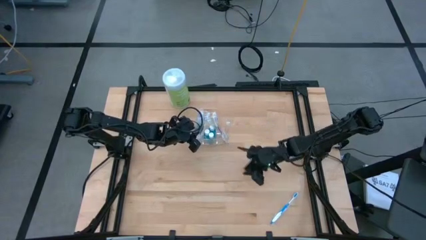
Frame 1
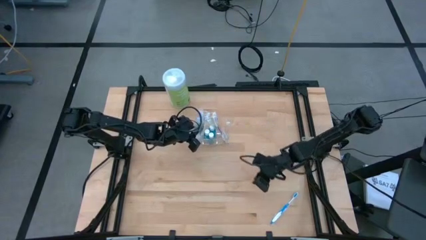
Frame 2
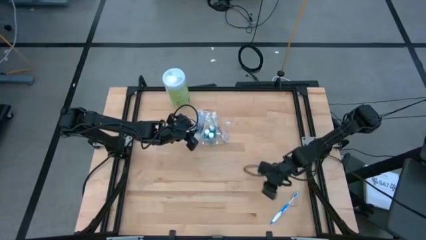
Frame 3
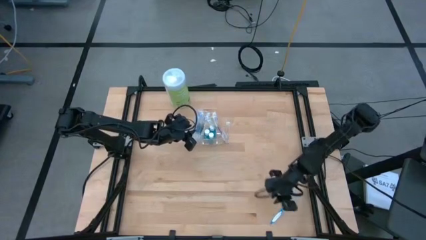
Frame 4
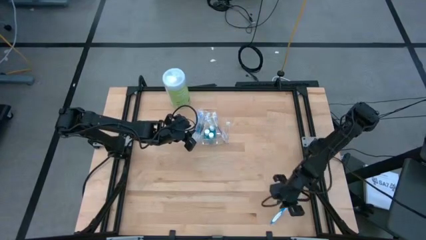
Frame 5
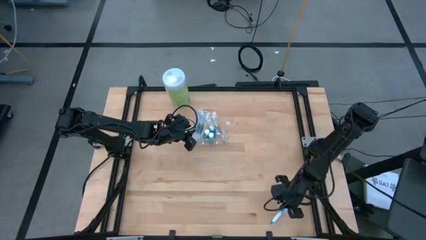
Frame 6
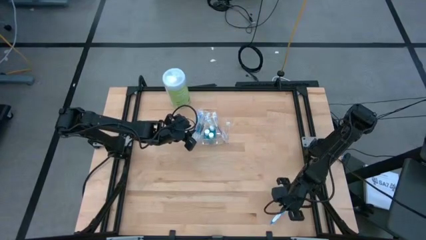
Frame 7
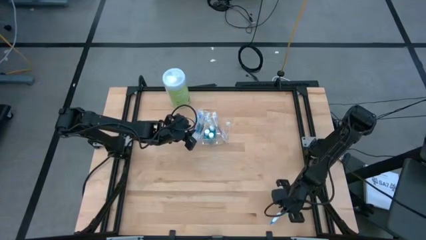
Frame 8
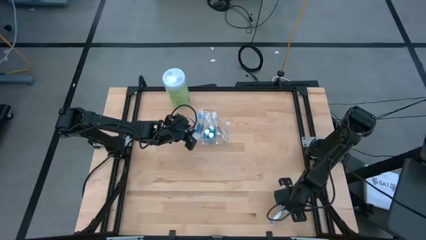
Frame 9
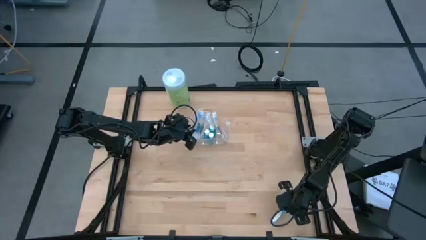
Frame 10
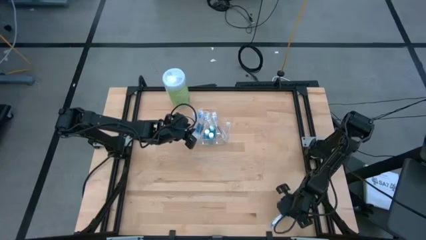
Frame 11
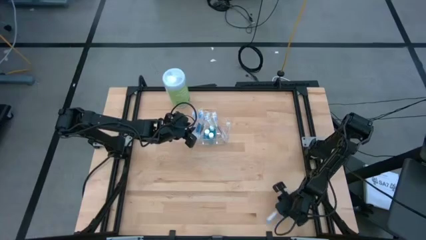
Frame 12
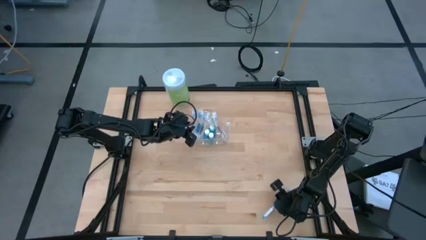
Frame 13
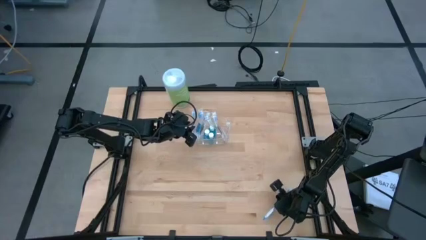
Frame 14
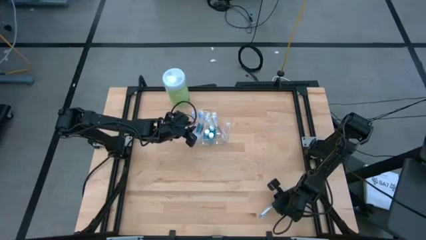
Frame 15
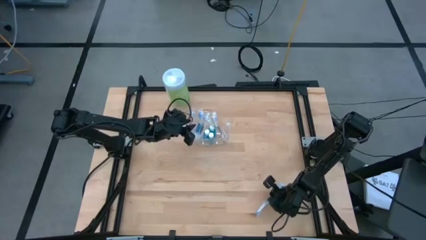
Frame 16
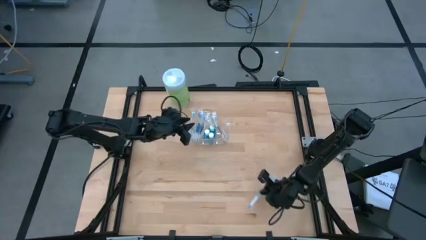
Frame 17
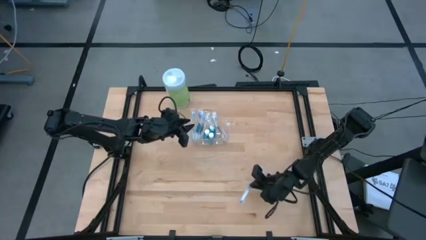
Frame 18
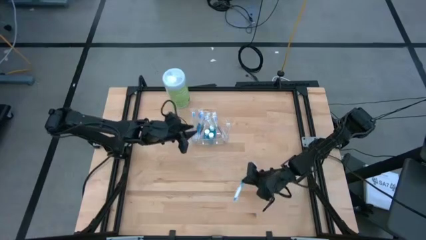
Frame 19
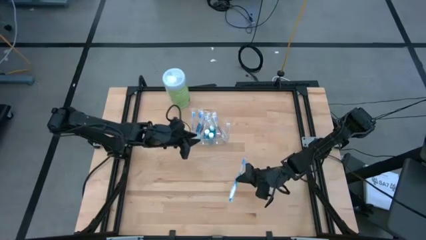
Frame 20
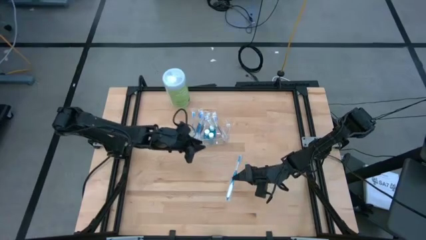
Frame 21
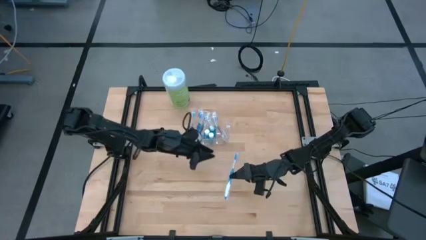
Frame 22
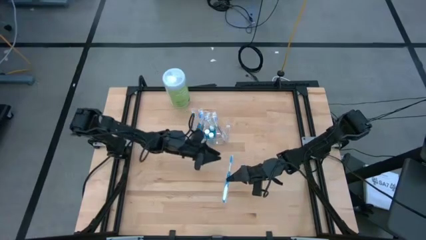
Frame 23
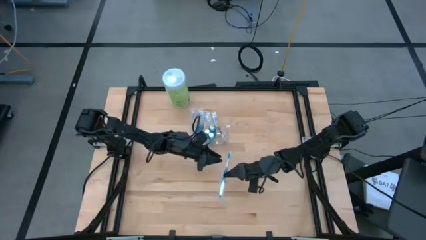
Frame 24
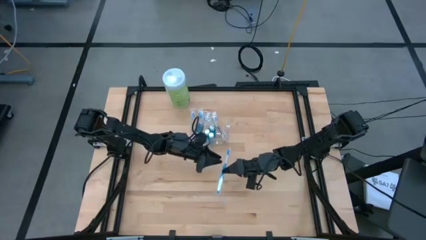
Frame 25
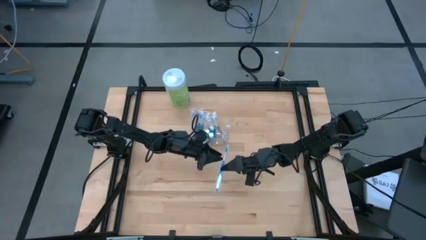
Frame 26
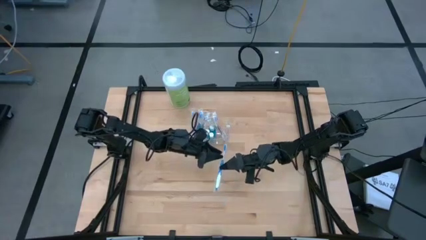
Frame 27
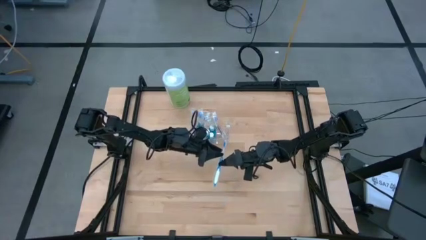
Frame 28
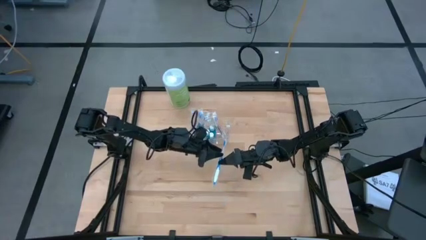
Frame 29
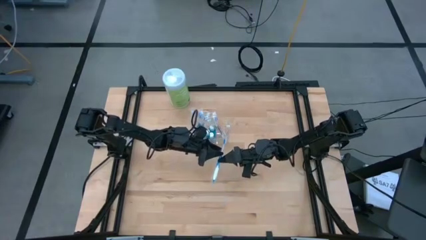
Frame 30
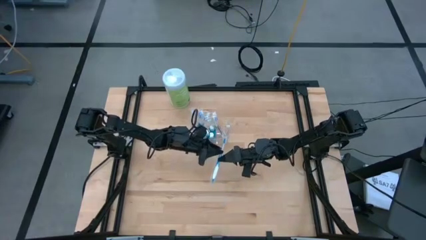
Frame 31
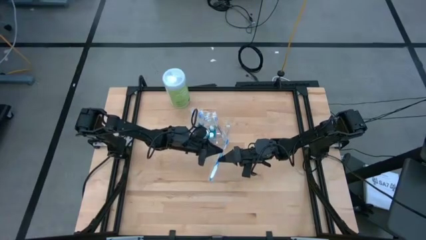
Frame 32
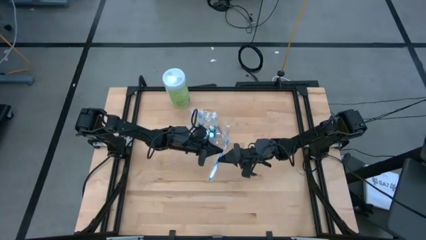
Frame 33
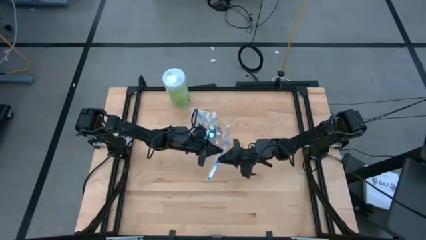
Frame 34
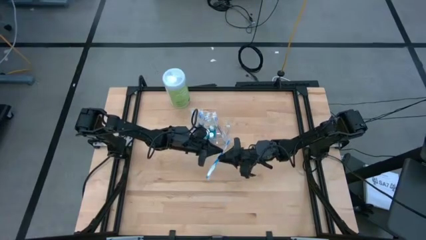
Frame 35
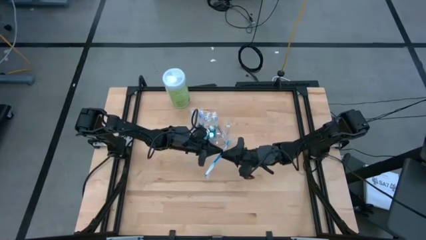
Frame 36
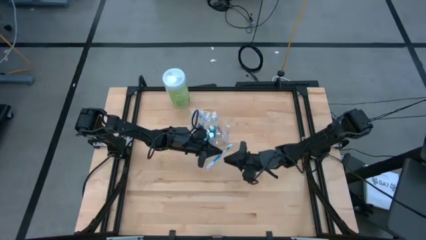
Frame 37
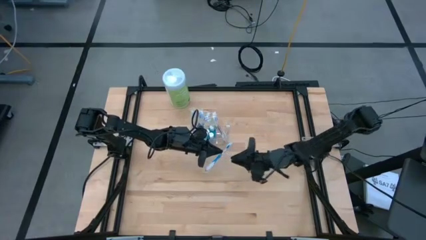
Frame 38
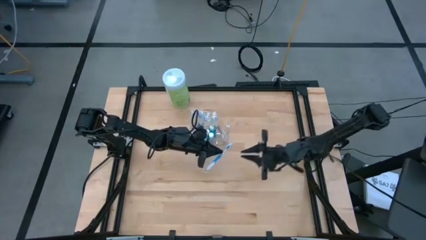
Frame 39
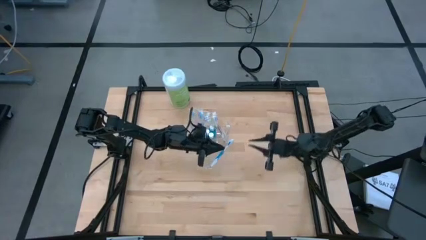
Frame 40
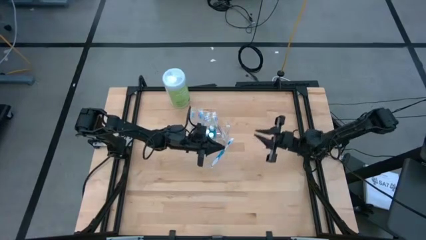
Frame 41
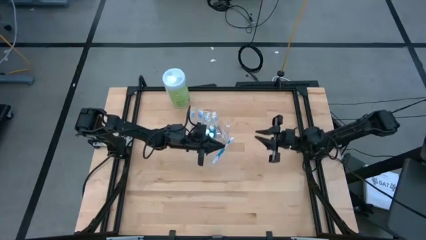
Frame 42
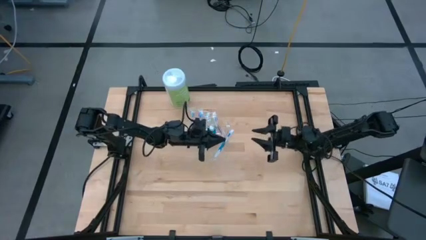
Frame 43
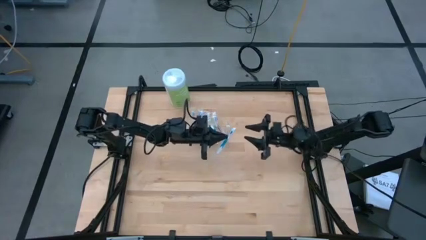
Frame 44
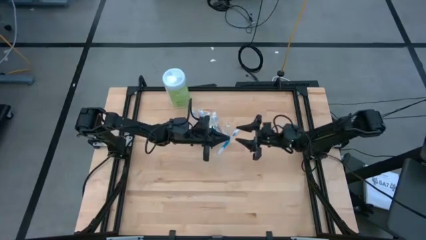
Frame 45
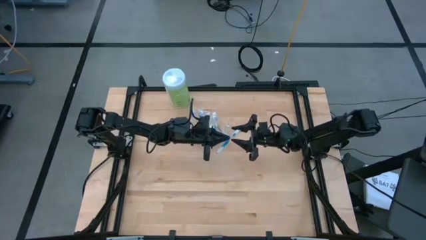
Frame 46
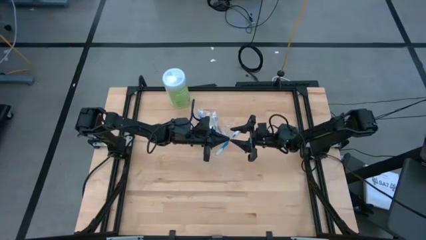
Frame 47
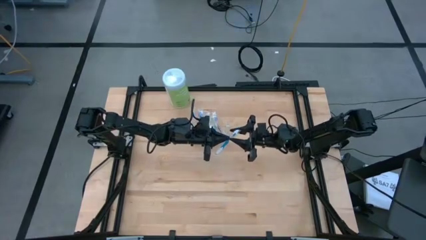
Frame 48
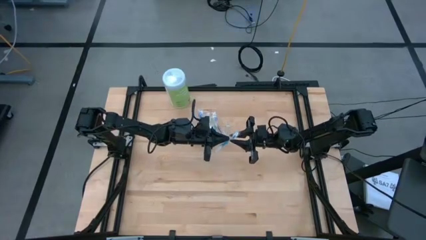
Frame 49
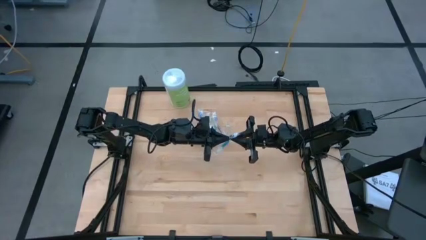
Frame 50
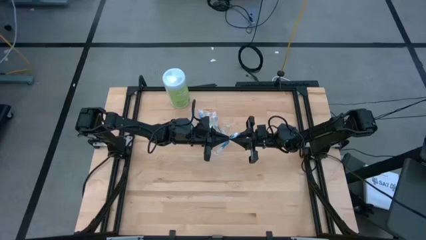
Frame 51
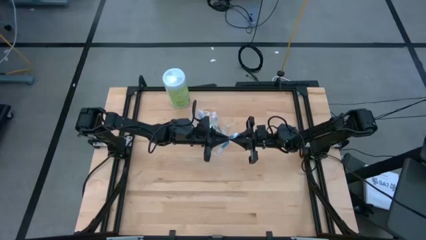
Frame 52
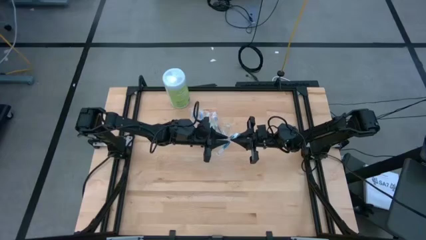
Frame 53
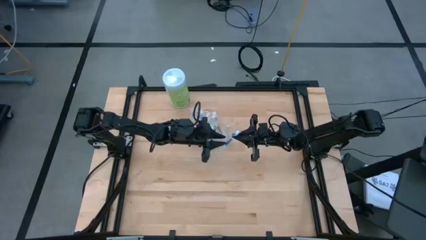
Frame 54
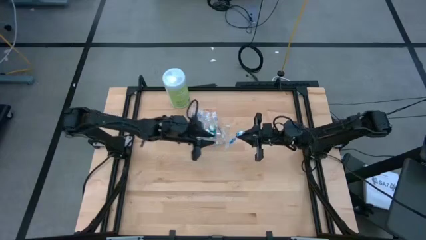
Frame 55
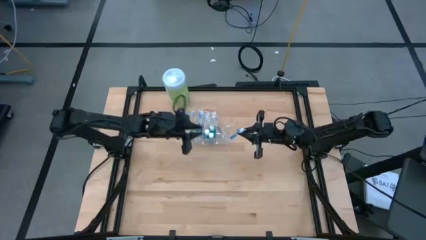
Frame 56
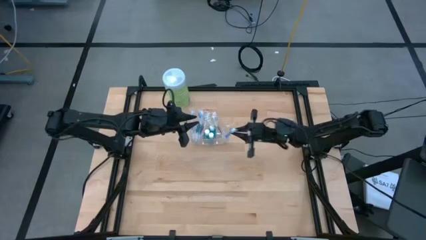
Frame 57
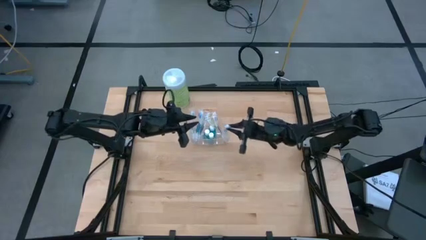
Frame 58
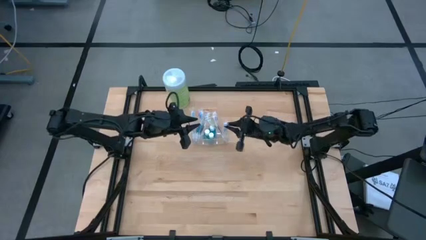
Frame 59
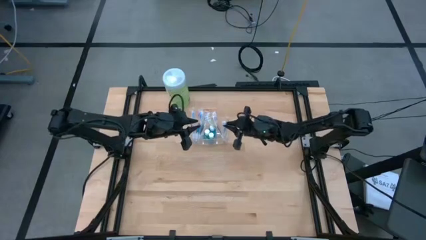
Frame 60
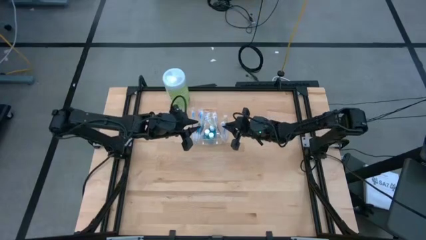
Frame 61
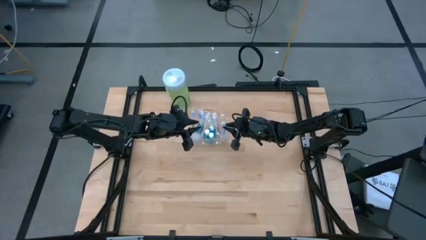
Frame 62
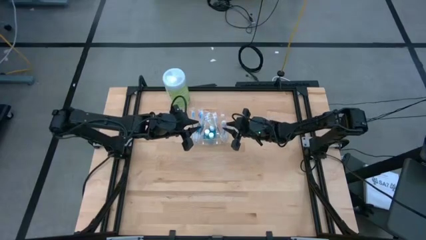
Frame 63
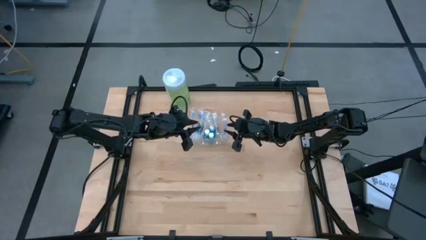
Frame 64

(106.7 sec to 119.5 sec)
Task: Pick & Place toothbrushing station
Put the blue toothbrush into the transparent organizer

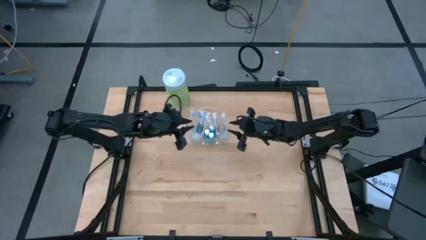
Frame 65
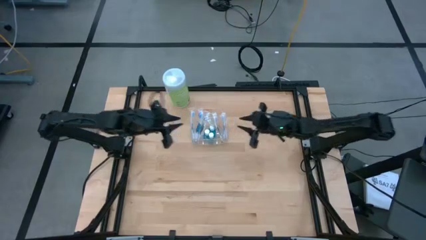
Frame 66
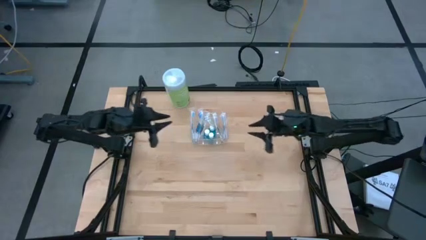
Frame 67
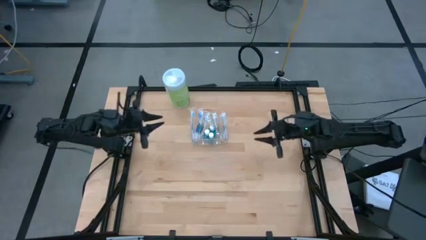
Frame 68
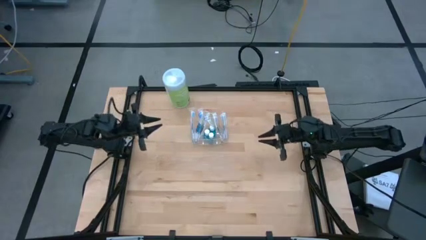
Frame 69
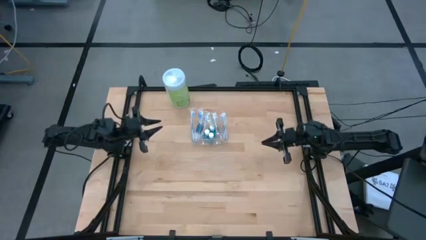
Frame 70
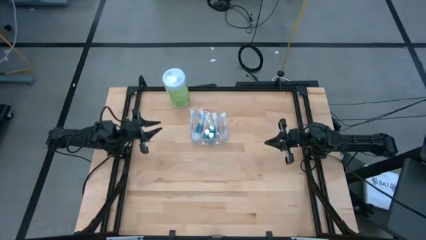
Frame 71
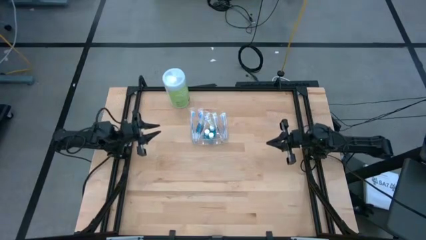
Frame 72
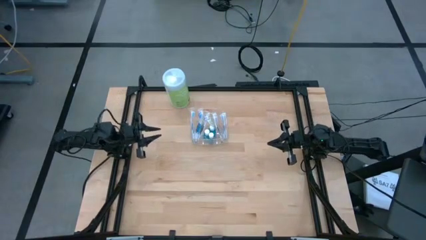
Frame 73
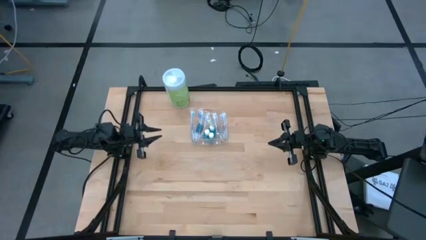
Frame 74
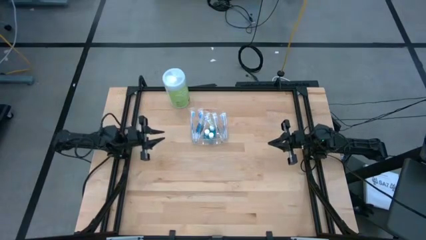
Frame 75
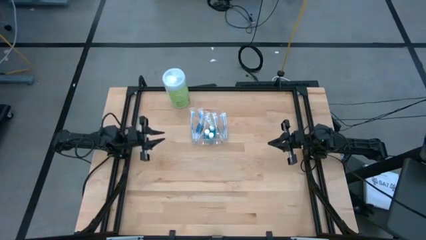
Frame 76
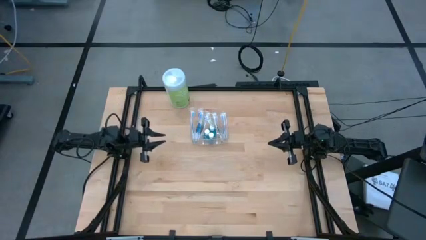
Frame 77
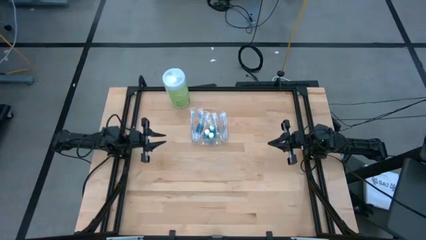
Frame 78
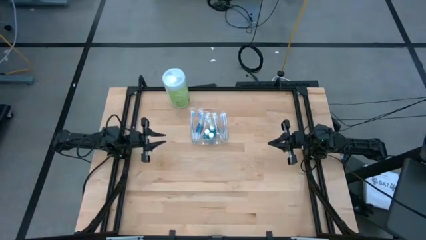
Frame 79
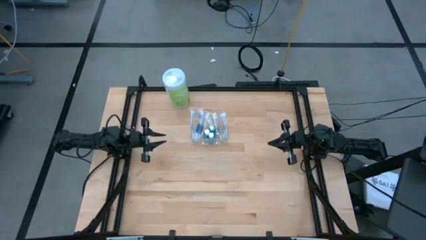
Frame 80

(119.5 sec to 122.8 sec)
Return to Home Position

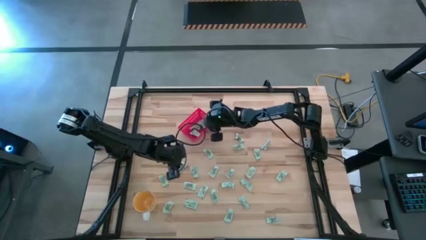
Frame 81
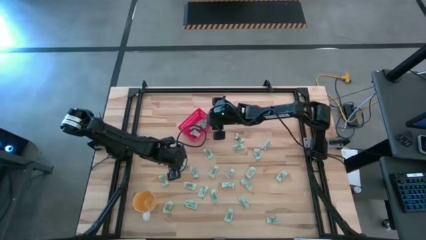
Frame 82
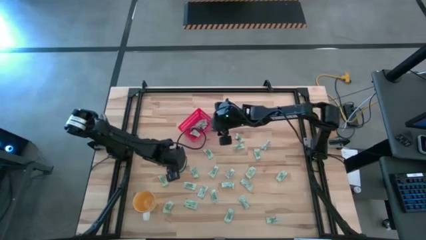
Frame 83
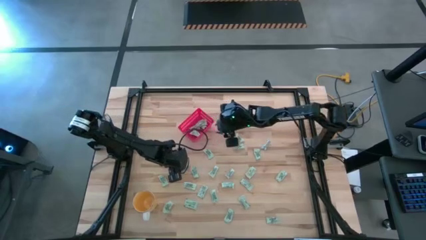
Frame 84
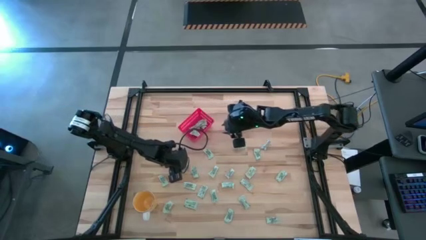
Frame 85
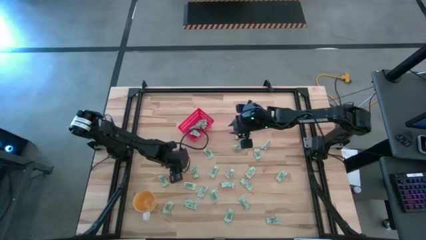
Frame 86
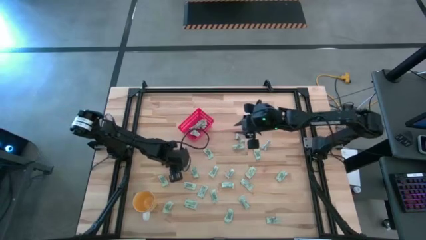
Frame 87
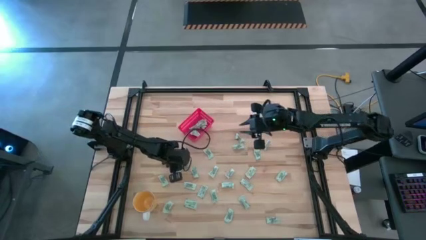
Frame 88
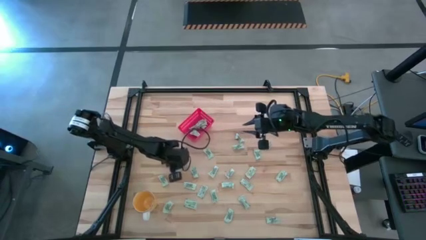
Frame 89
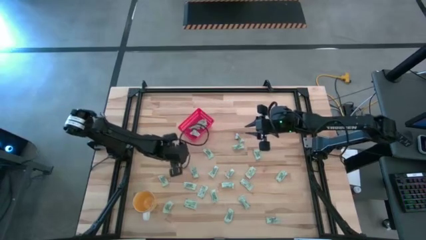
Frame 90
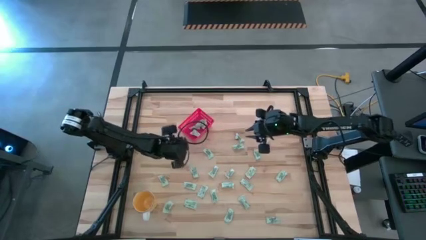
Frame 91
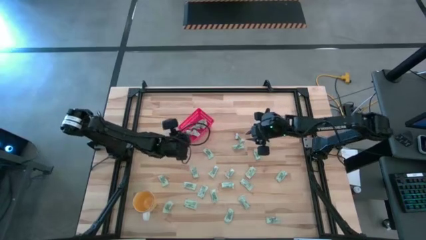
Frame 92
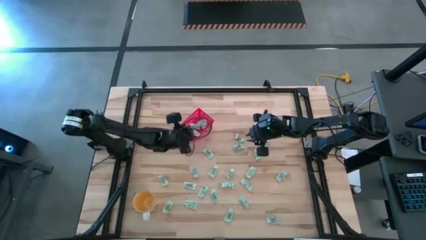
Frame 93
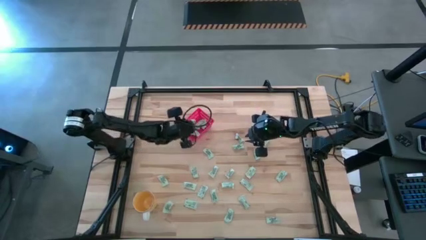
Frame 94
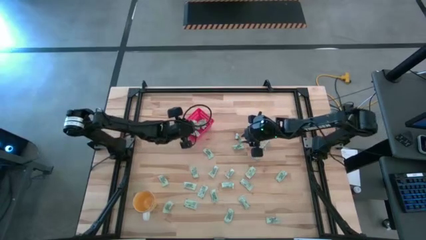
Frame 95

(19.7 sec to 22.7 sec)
Task: Pick and place Stevia / Truvia into bins
Put the white stevia packet into the red bin
